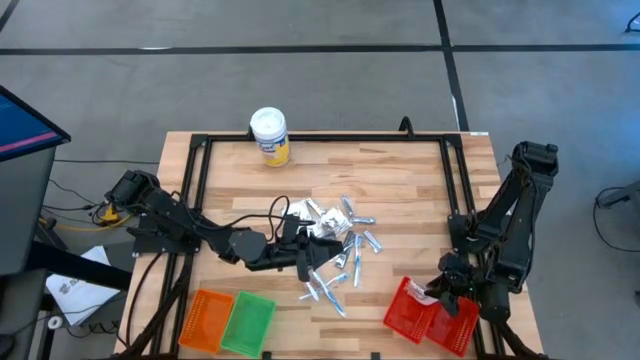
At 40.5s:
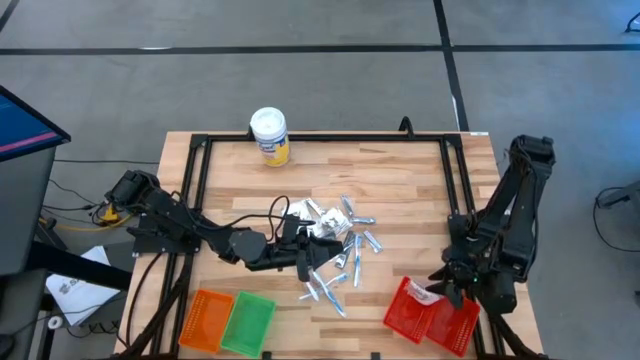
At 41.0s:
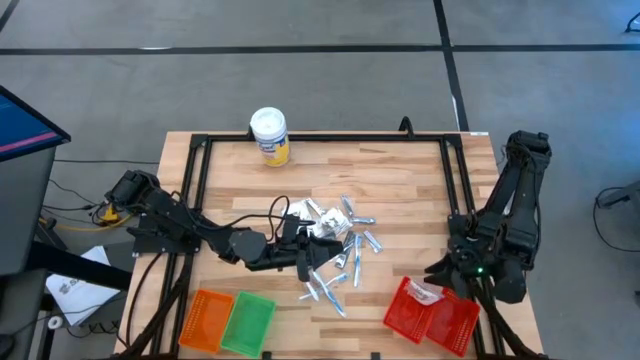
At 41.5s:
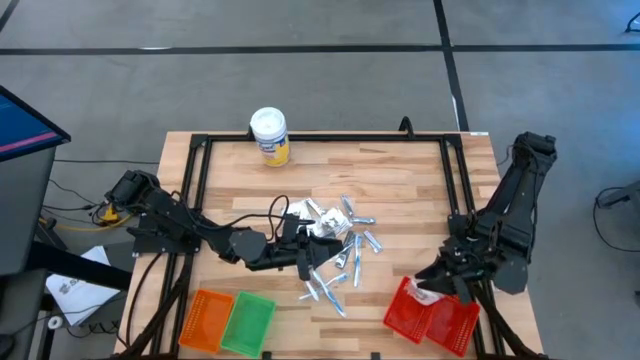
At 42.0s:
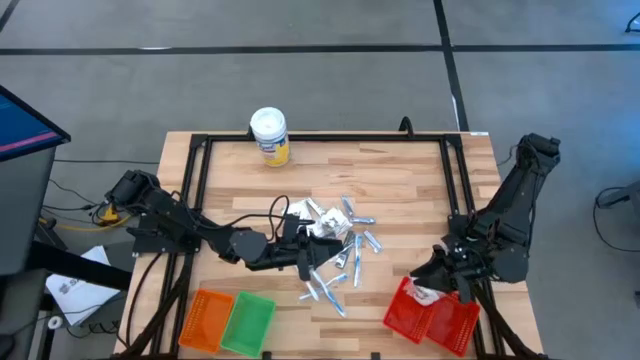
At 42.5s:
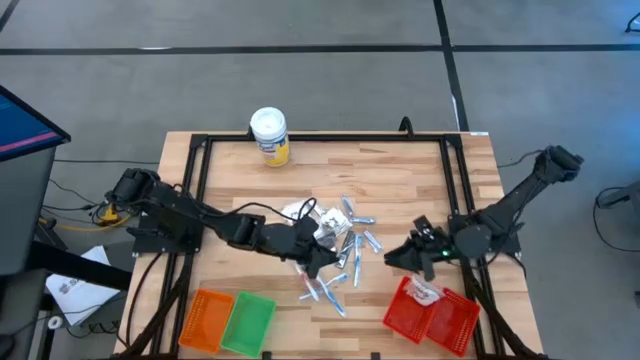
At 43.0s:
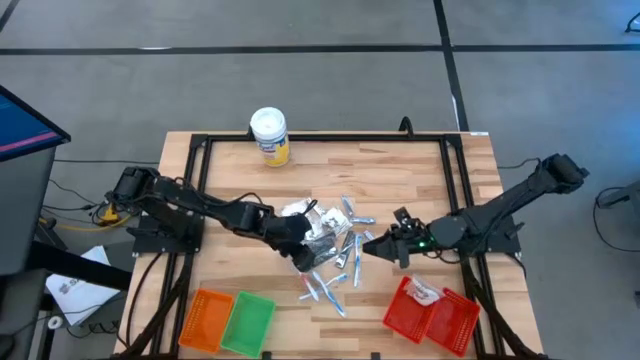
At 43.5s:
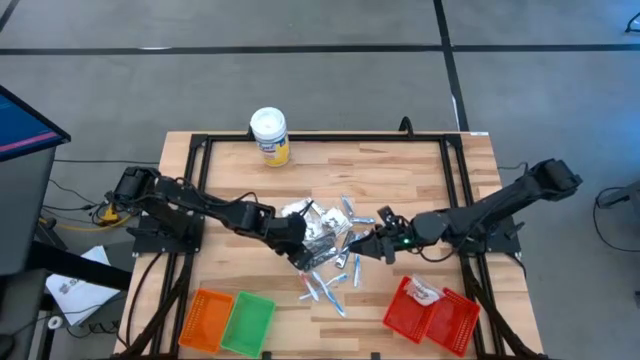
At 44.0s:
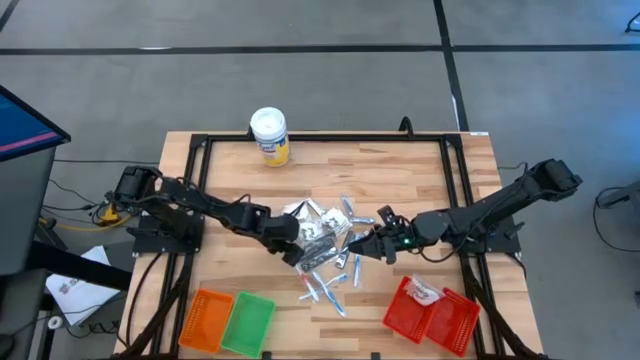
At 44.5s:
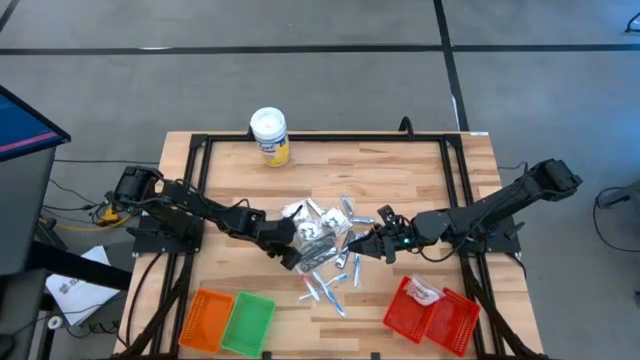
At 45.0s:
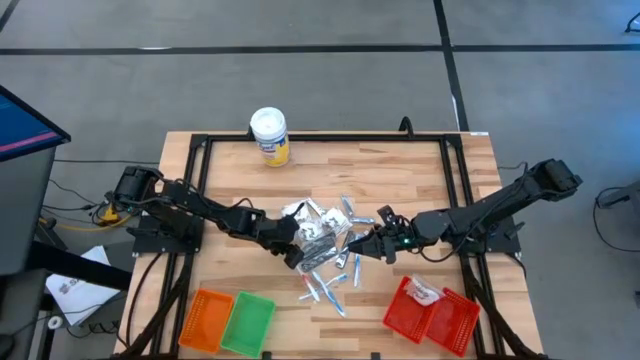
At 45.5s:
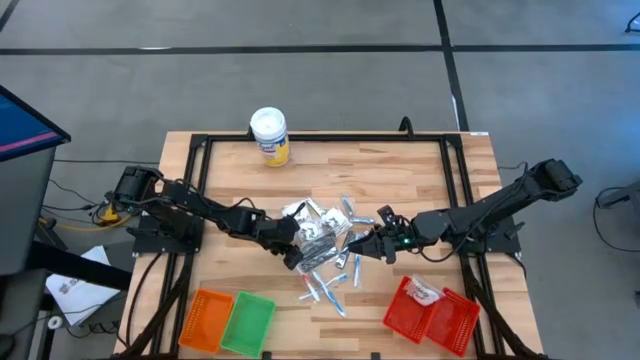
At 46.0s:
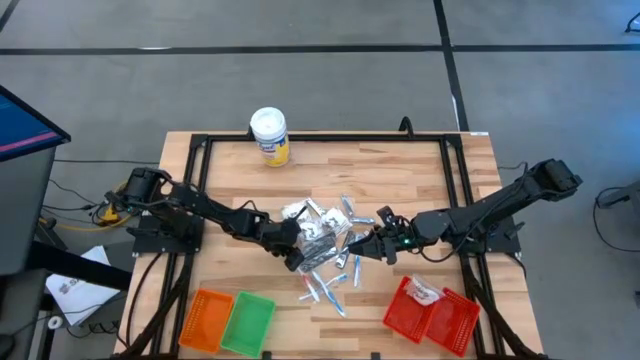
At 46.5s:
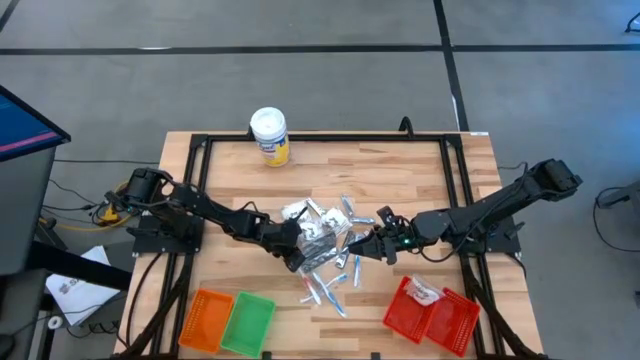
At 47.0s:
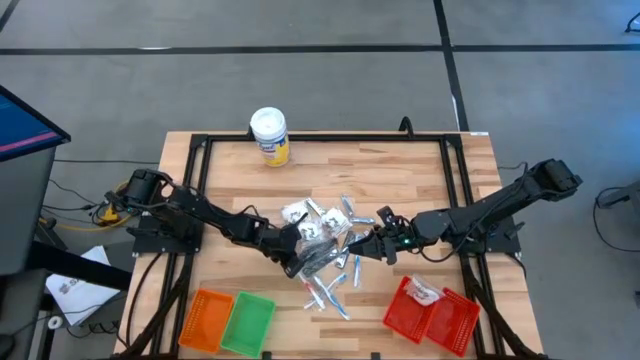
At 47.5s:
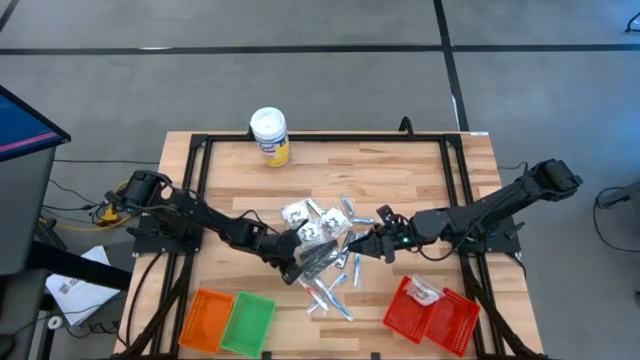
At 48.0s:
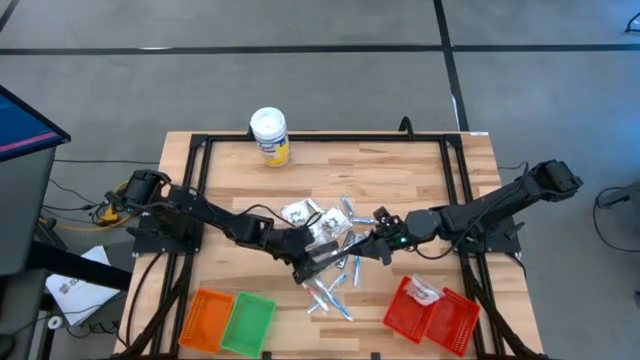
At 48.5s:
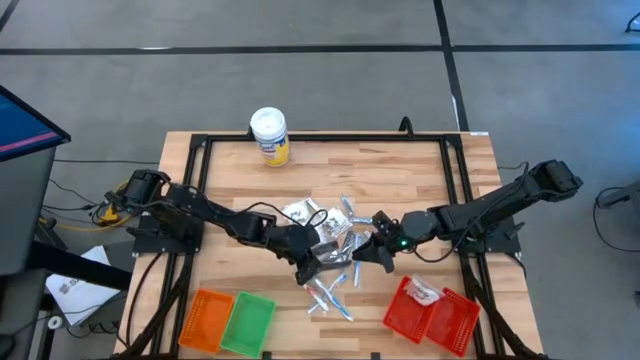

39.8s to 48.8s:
Task: Pick & Place Travel size toiletries
Put the black comb into the orange basket

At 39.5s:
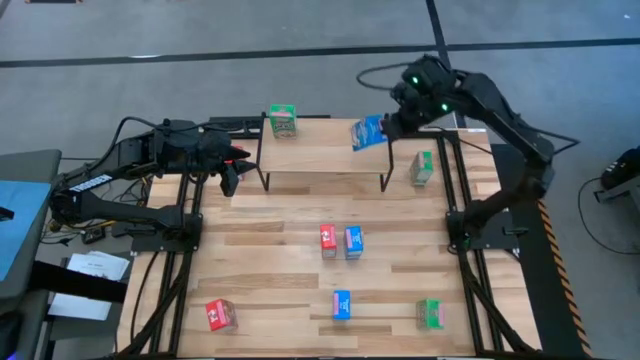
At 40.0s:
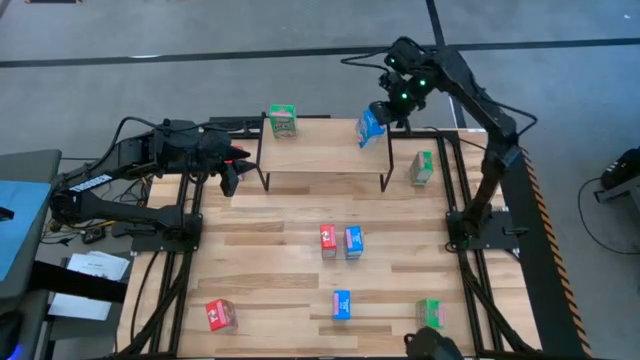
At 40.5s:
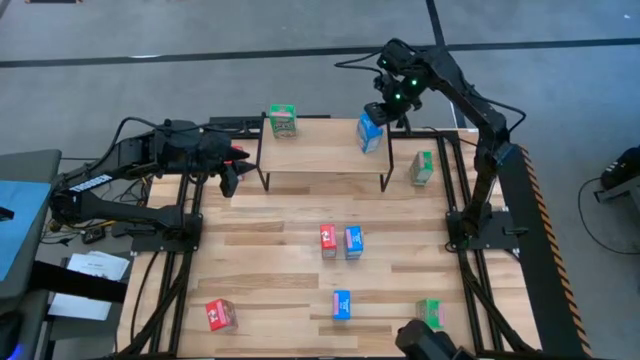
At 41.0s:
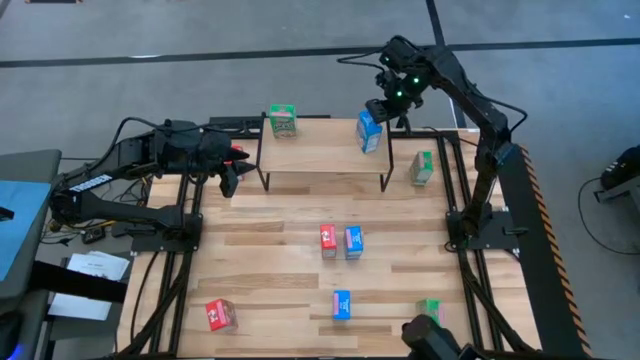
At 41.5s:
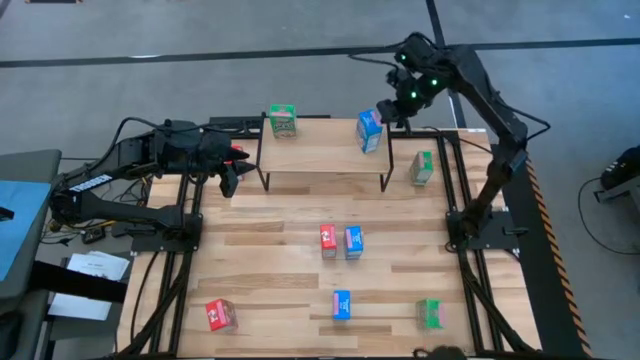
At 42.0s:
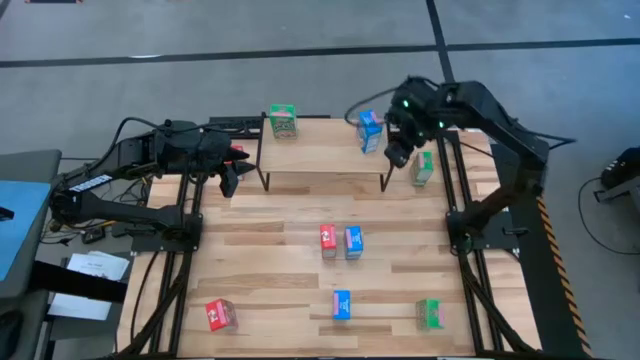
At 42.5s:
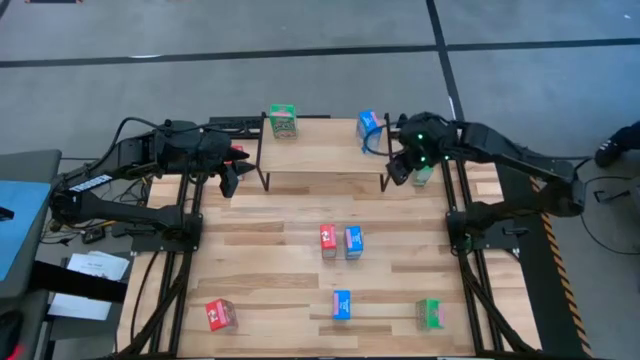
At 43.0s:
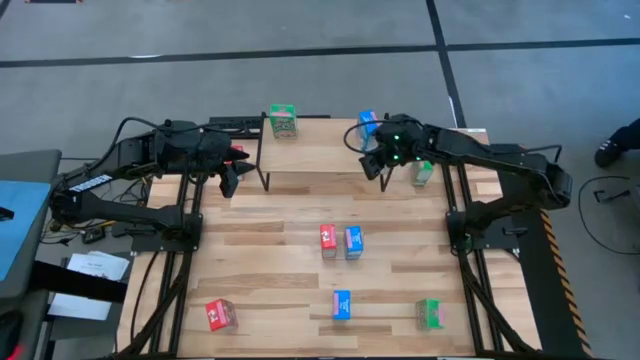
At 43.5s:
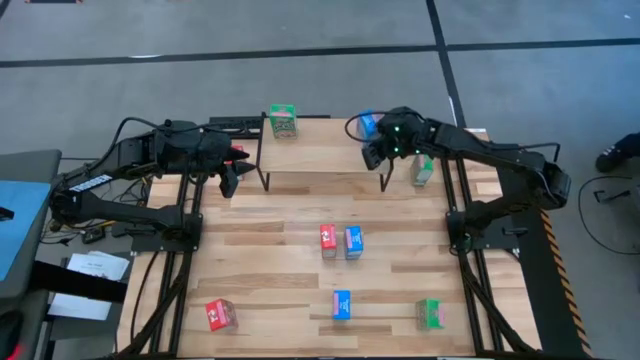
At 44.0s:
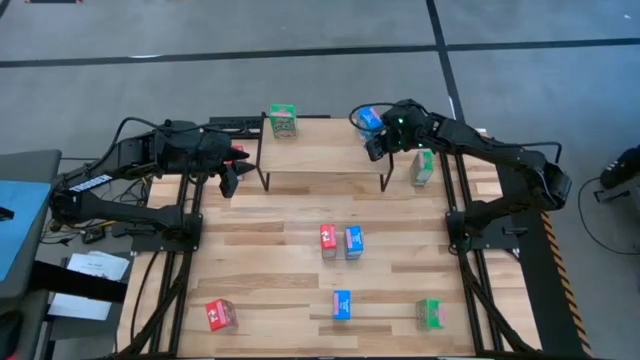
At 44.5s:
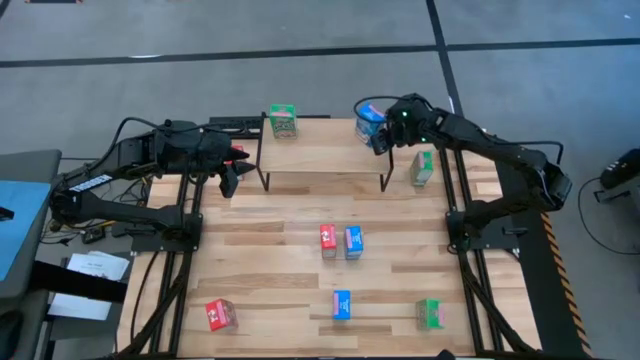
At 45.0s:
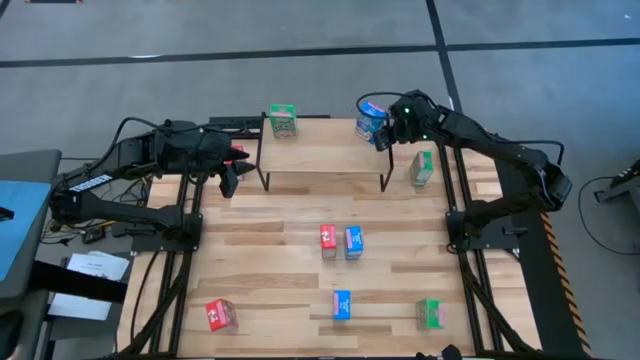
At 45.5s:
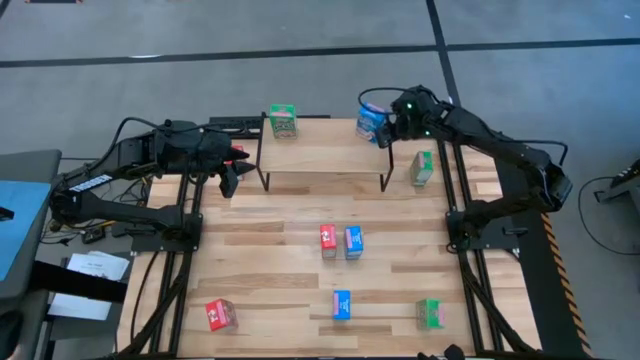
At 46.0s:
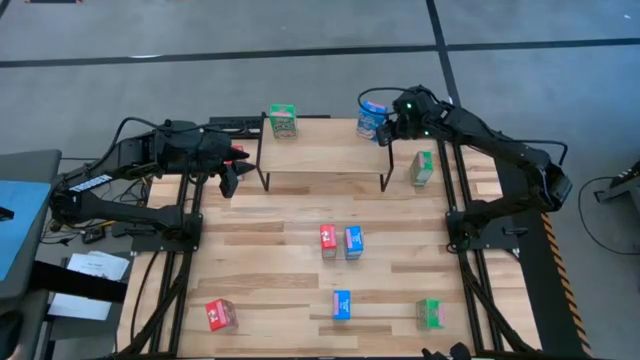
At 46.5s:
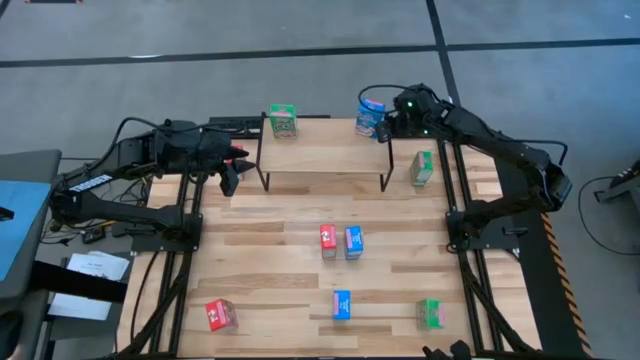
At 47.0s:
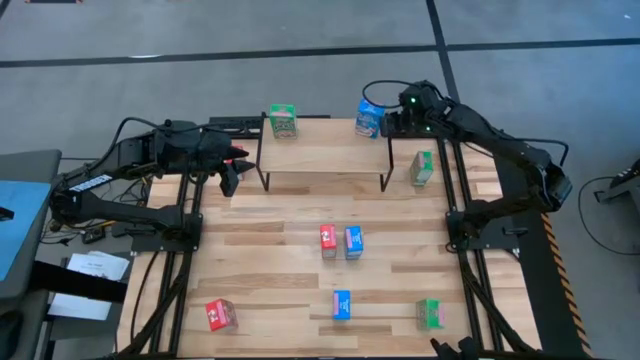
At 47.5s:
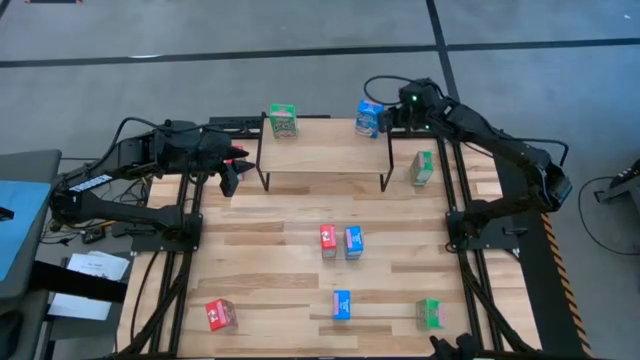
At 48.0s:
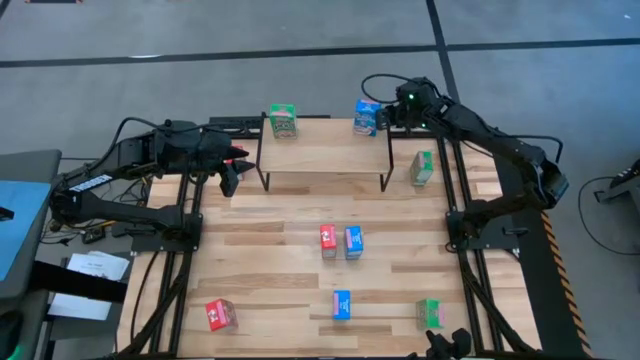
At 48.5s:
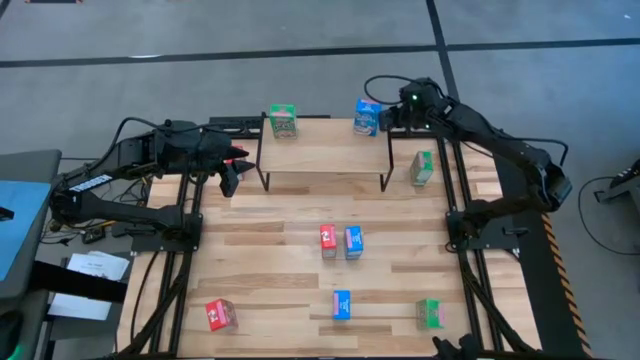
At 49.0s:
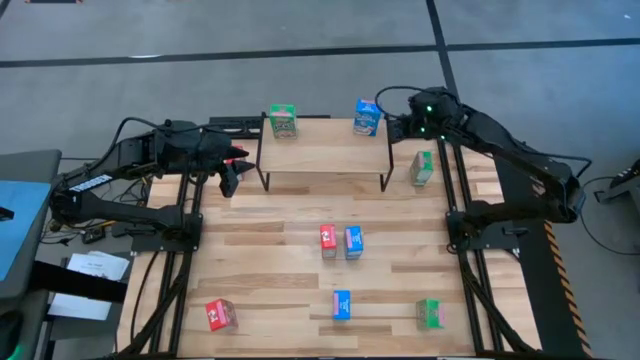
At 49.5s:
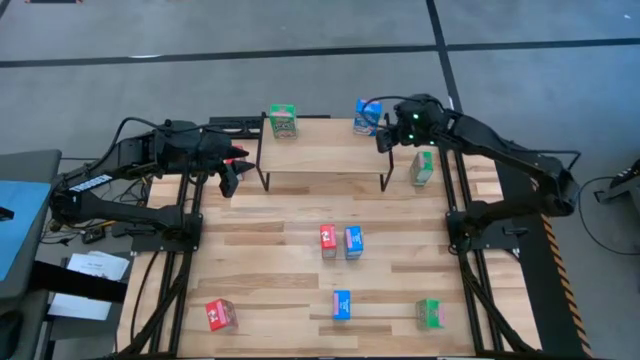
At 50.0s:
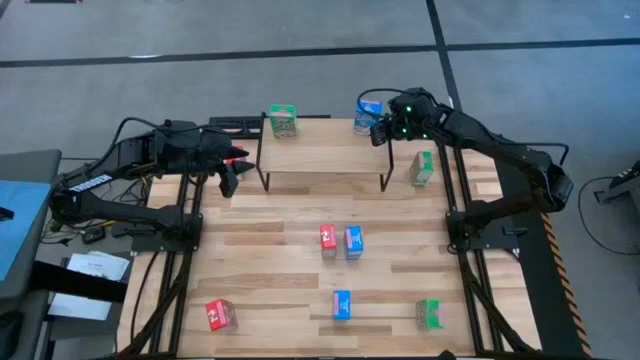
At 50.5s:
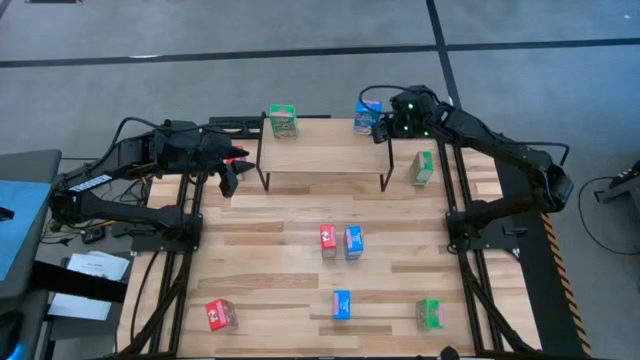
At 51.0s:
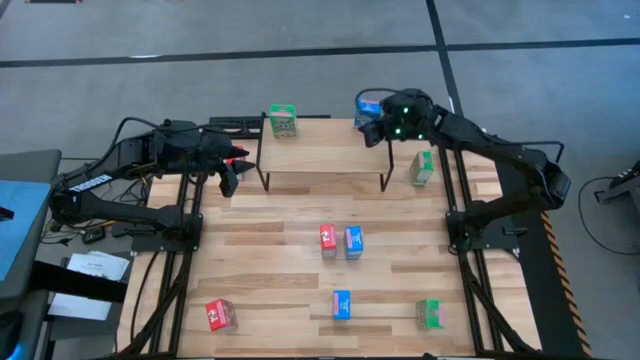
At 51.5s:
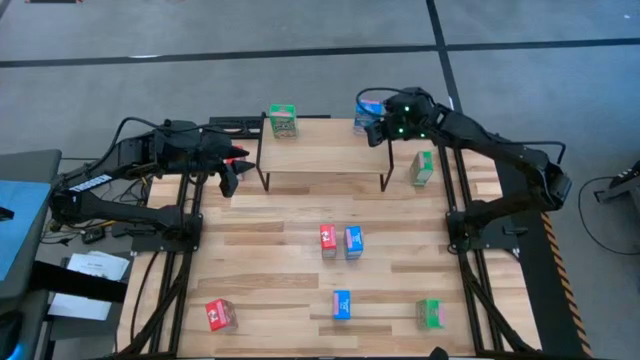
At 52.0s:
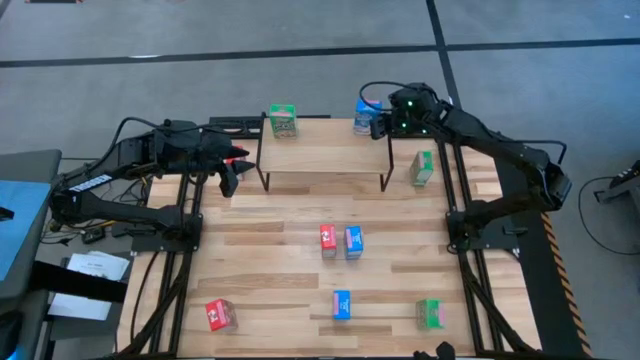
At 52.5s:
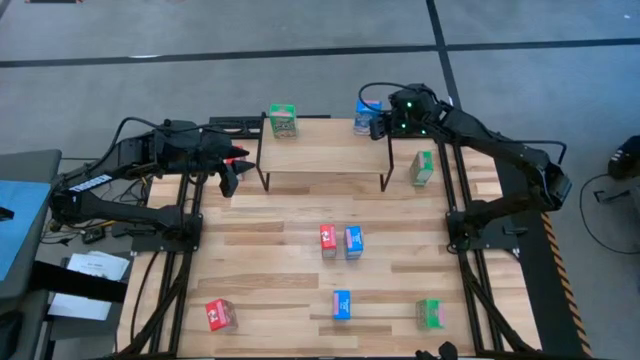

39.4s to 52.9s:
Task: Stack cereal on shelf
Put the top right blue cereal box on the shelf
